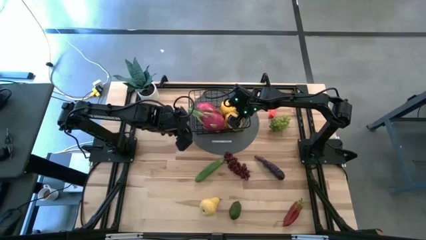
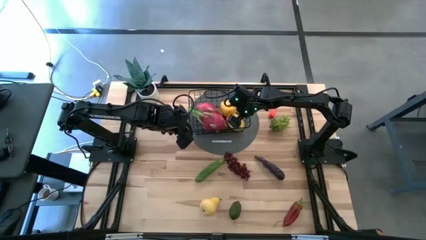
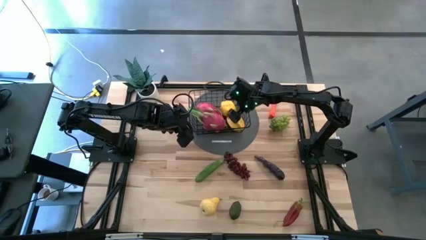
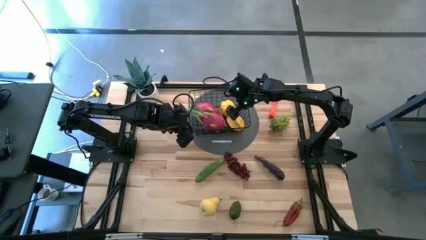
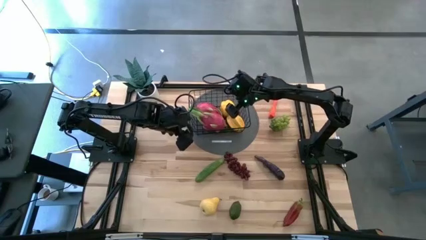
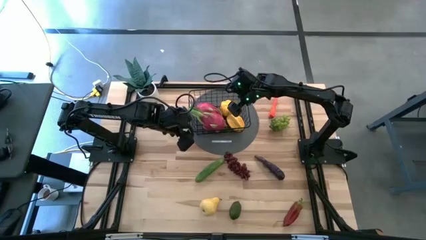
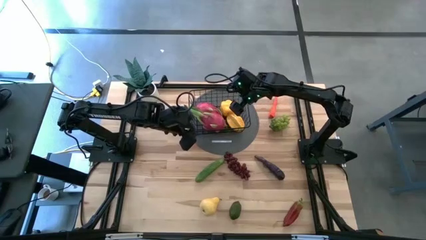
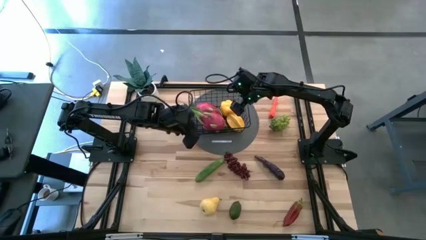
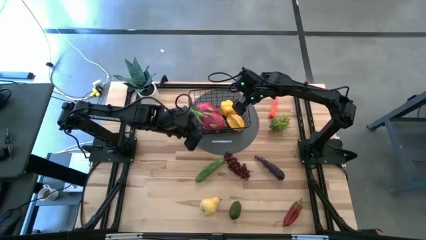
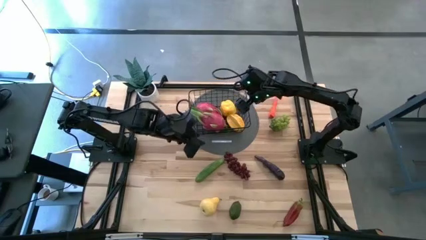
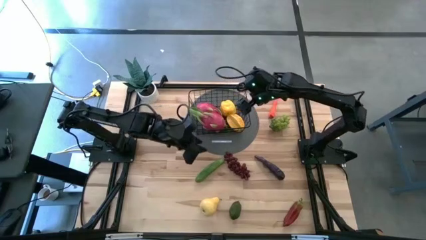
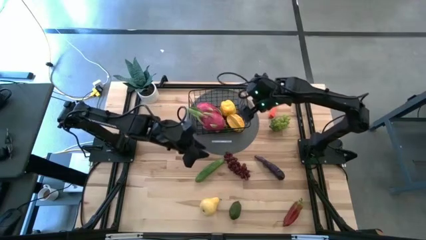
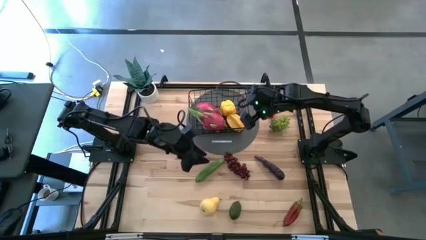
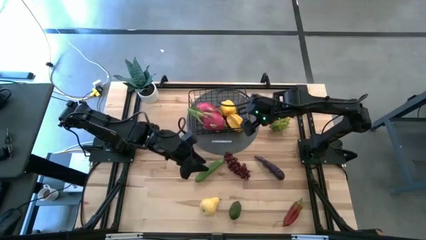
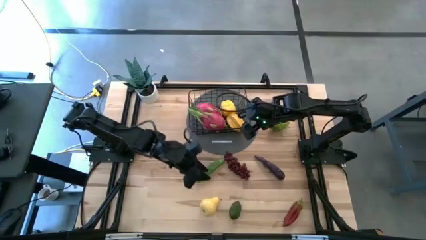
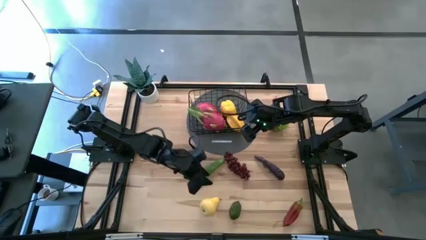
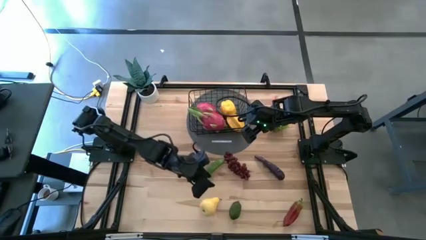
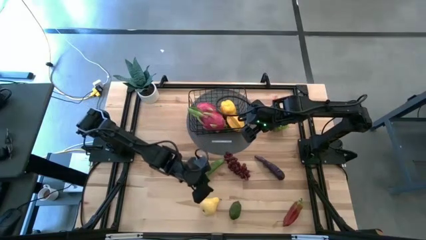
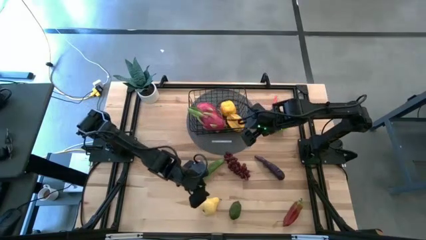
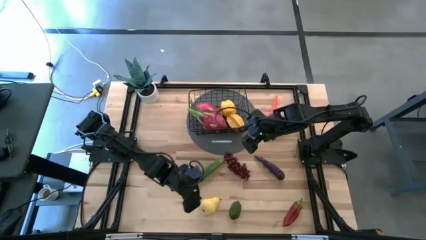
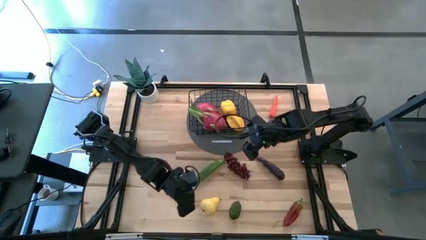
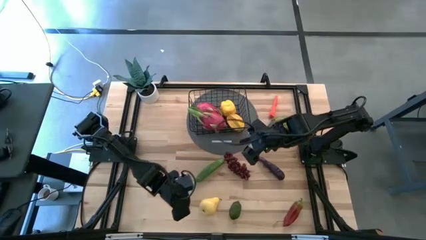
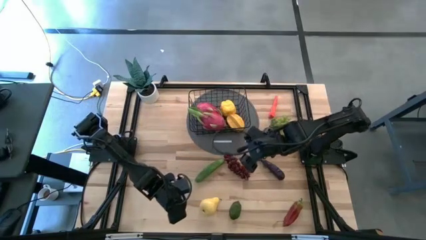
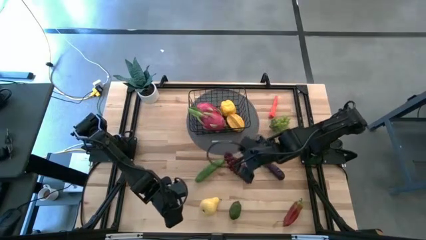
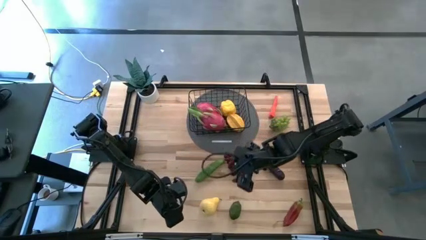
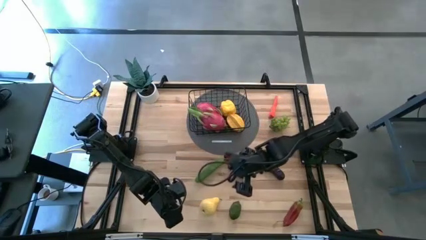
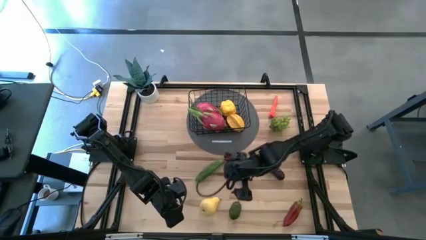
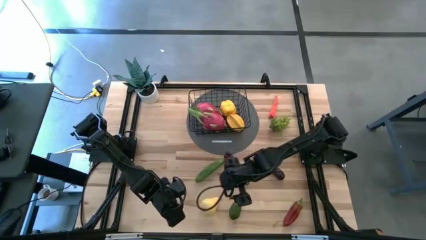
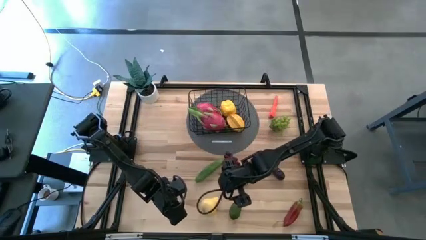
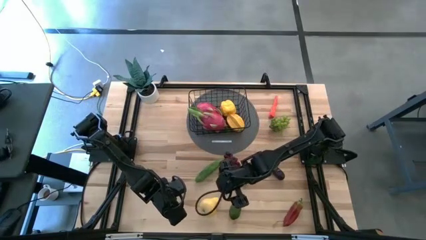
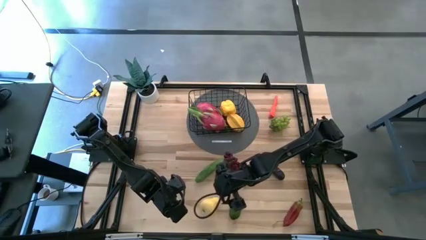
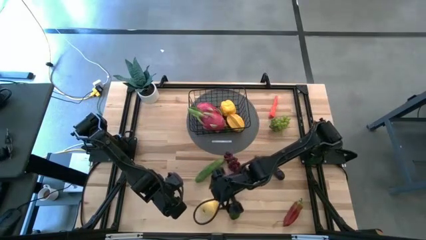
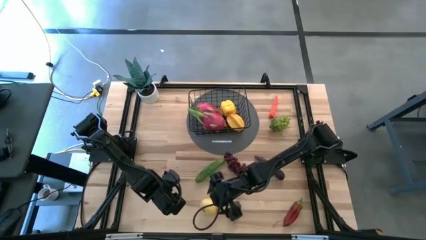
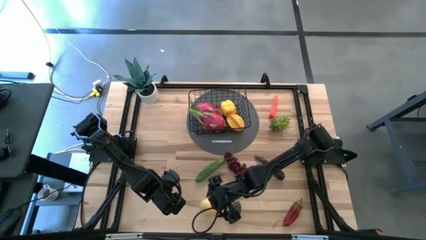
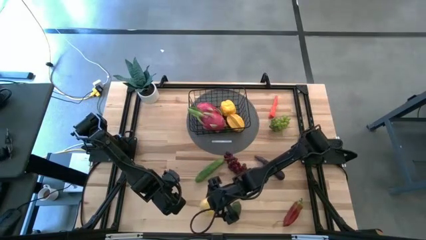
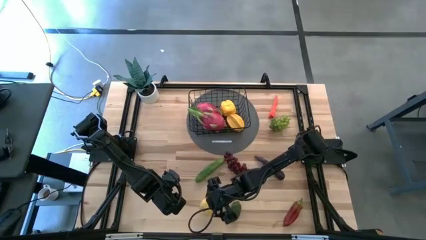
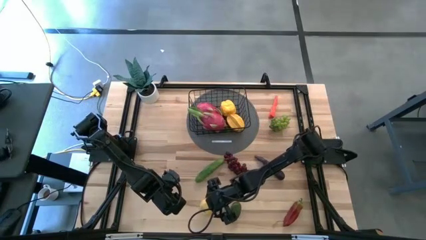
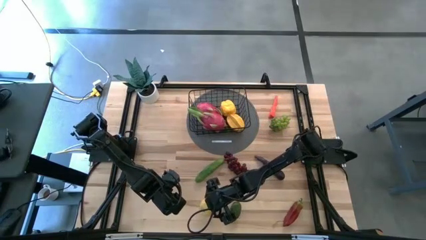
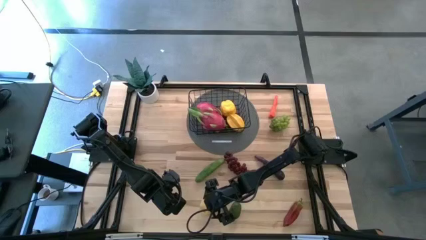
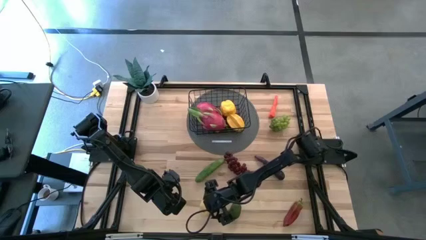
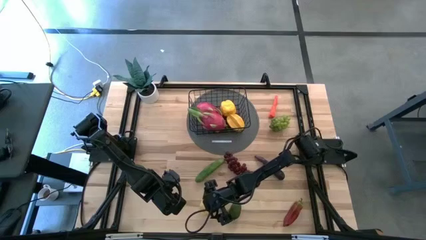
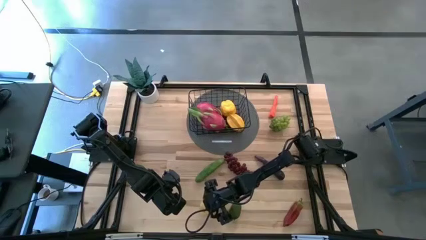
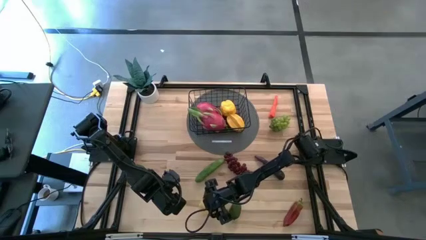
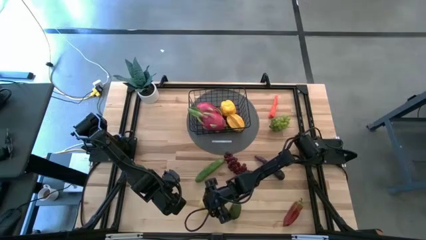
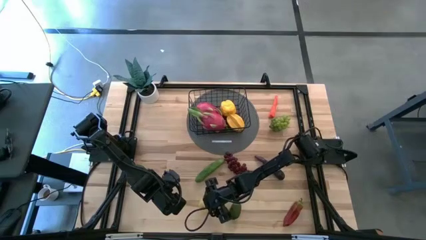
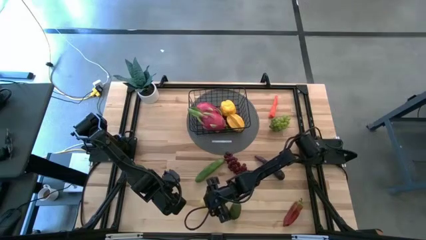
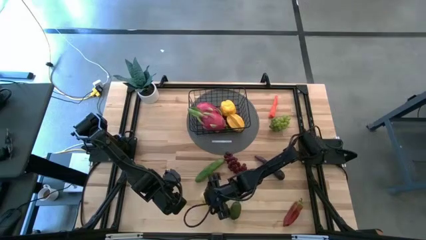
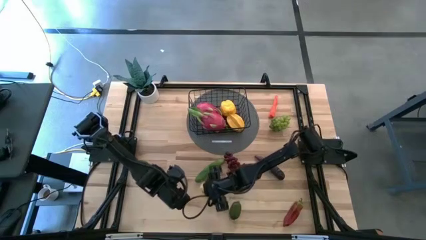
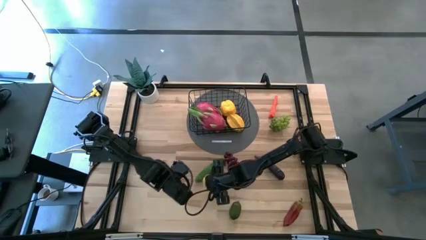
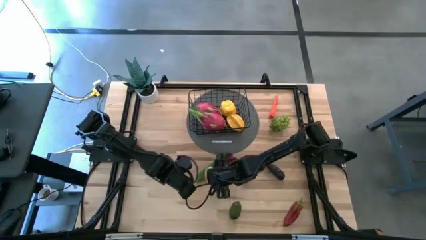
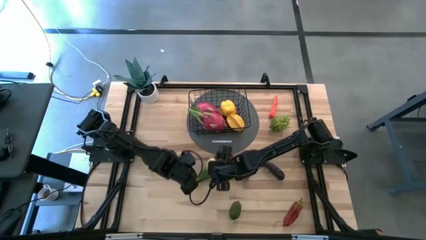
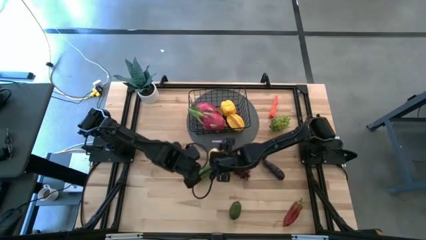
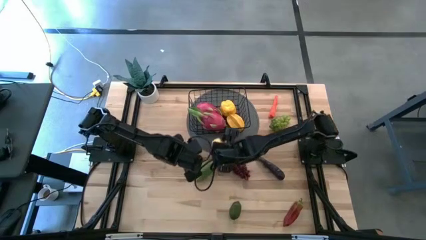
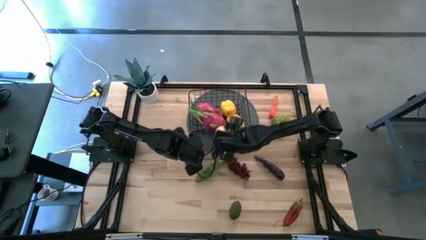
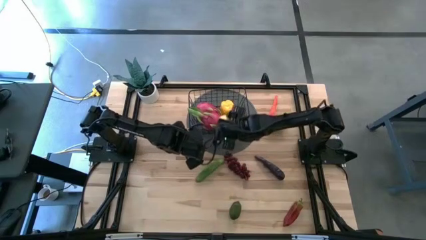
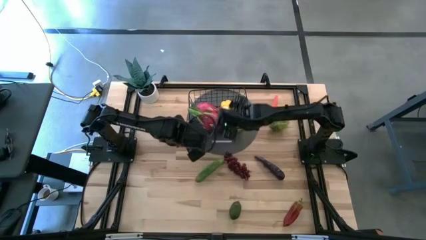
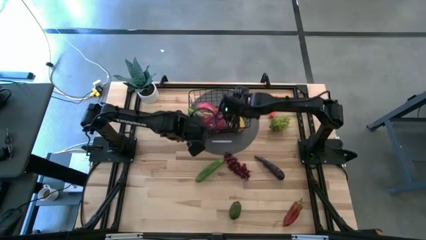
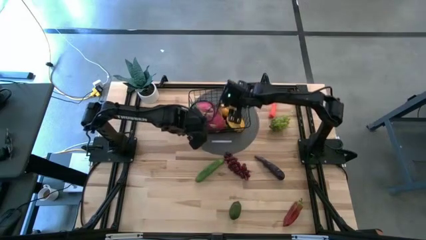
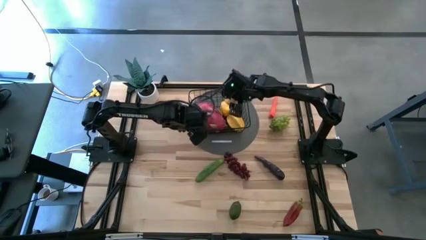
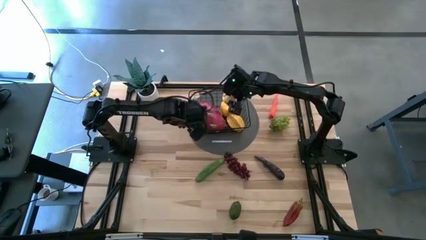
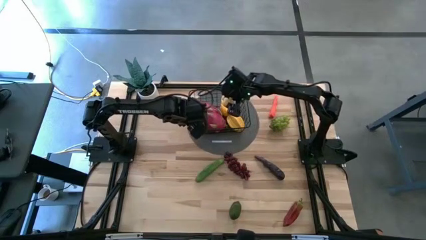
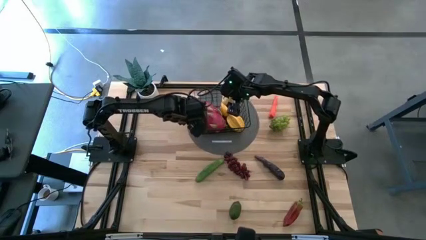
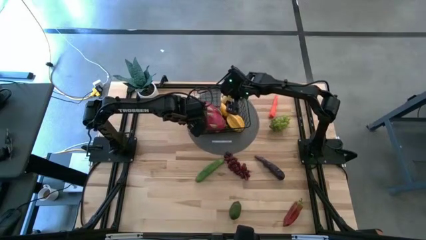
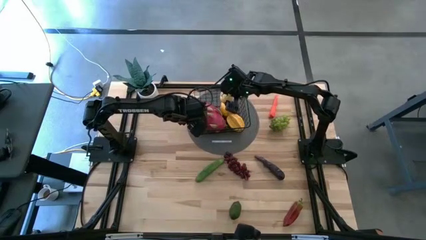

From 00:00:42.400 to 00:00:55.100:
Task: Build produce basket
Put the pear into the wire basket
